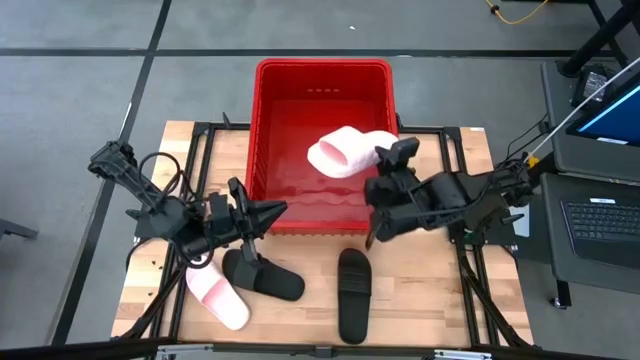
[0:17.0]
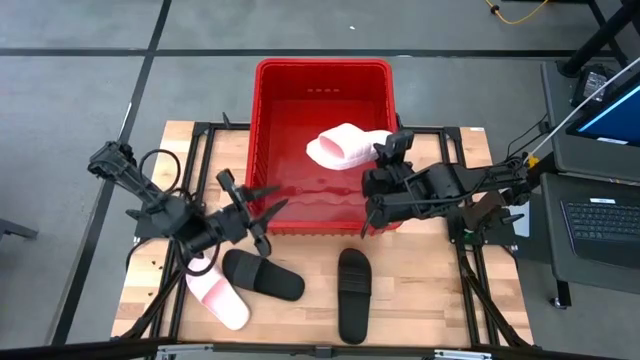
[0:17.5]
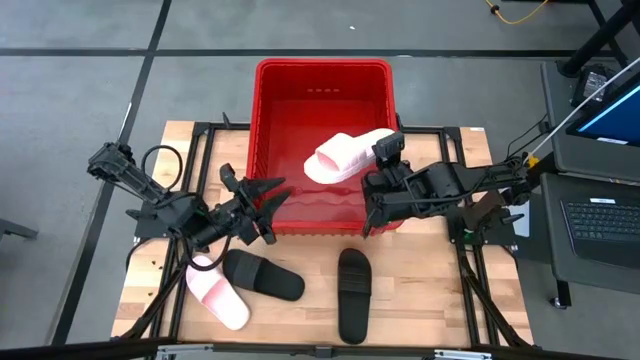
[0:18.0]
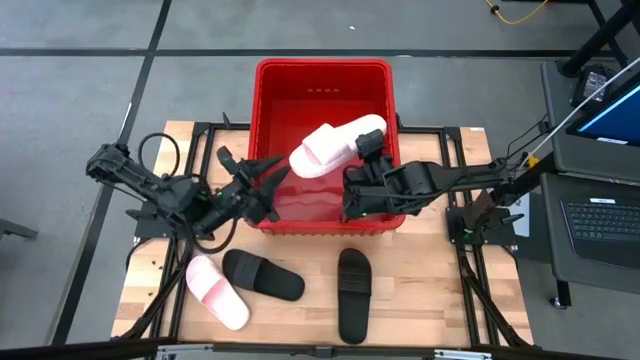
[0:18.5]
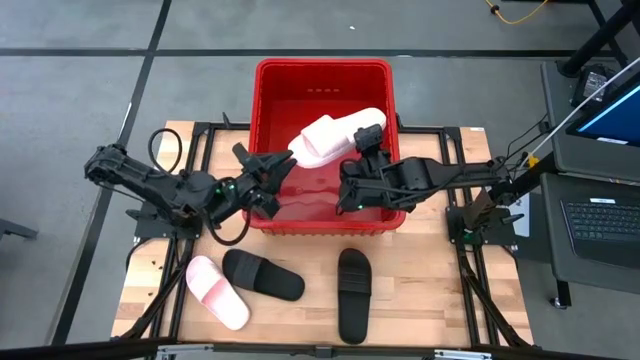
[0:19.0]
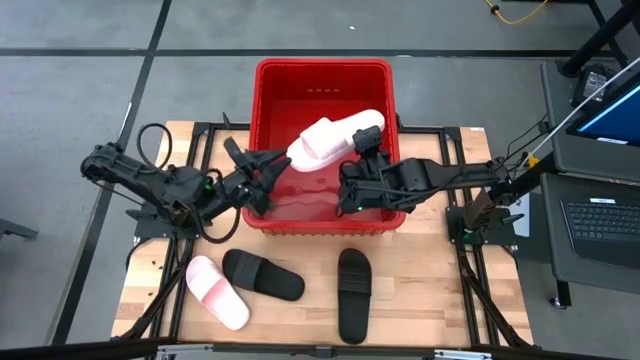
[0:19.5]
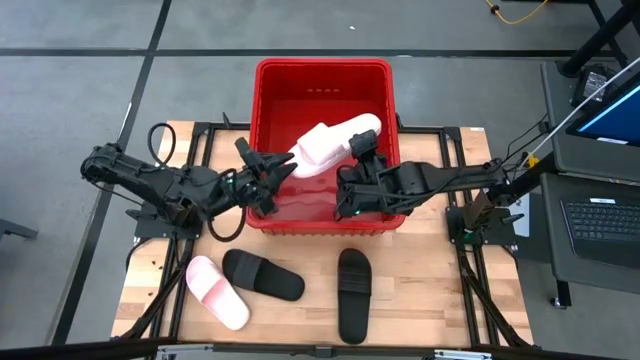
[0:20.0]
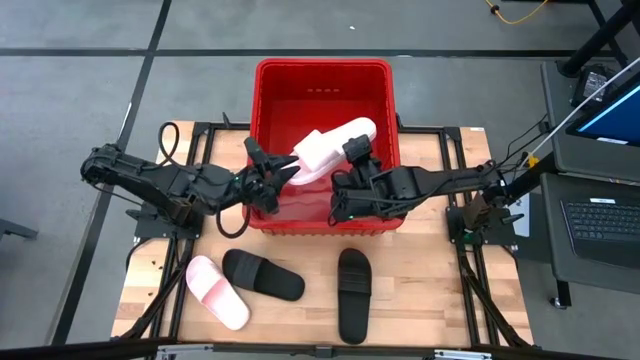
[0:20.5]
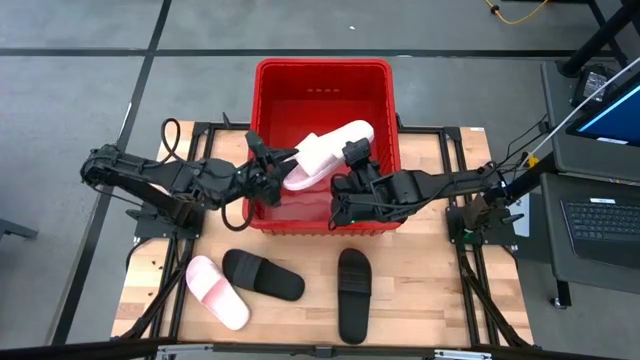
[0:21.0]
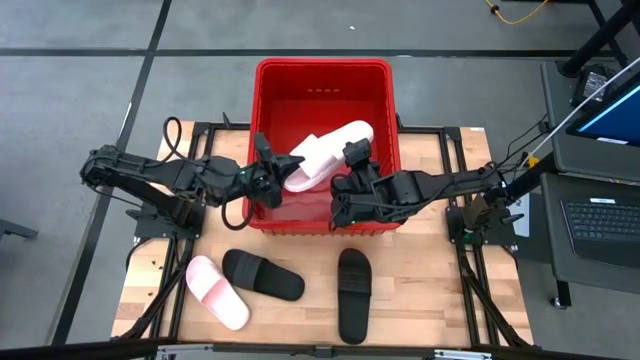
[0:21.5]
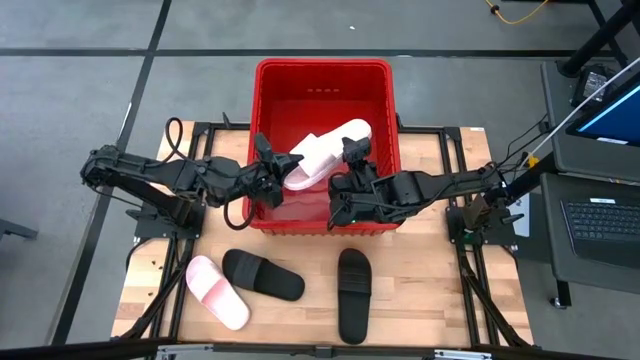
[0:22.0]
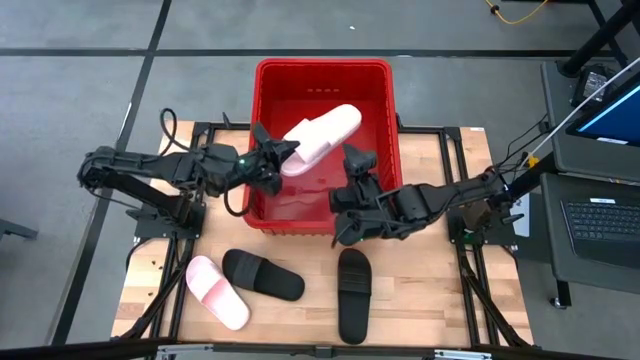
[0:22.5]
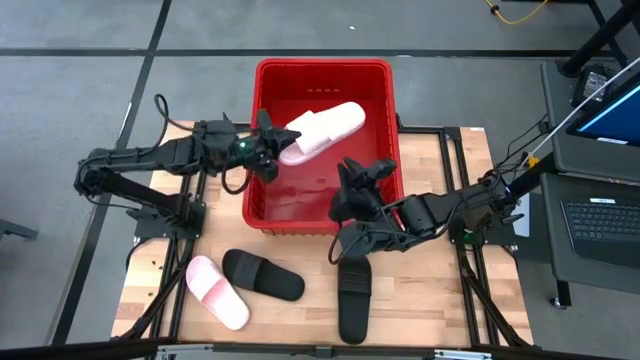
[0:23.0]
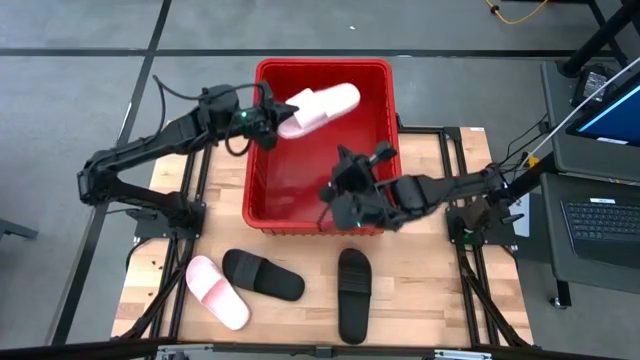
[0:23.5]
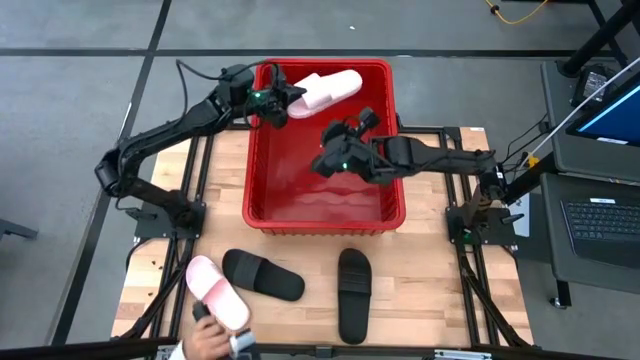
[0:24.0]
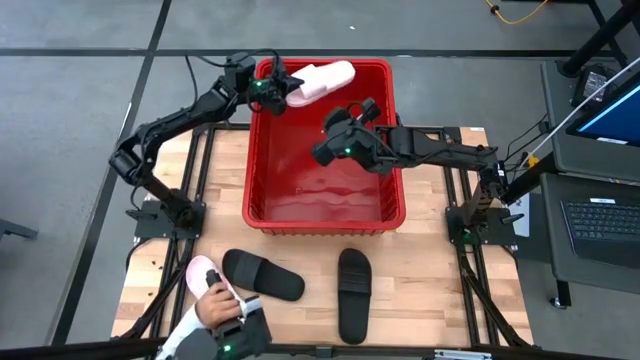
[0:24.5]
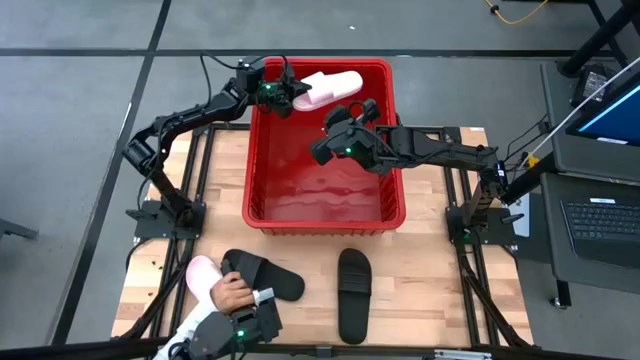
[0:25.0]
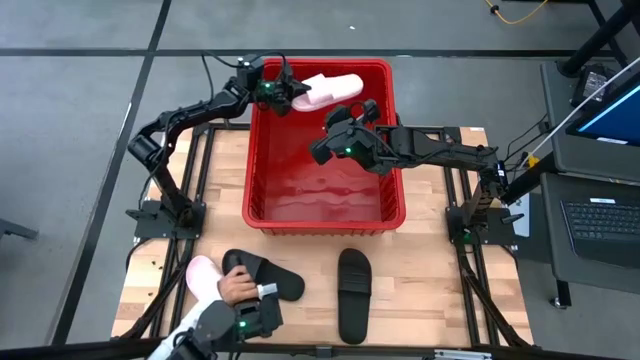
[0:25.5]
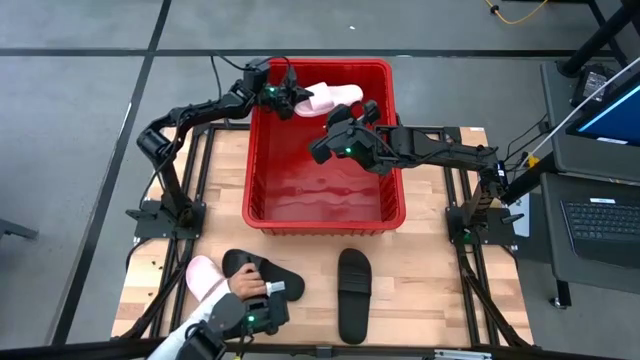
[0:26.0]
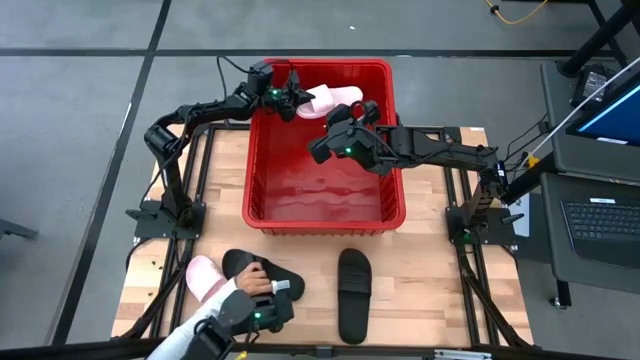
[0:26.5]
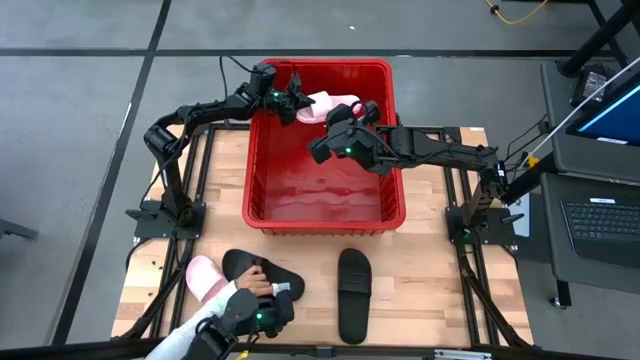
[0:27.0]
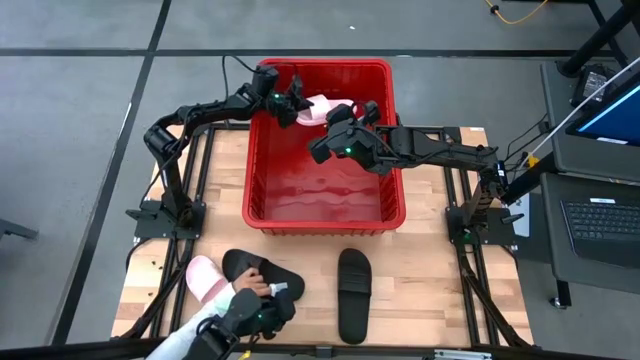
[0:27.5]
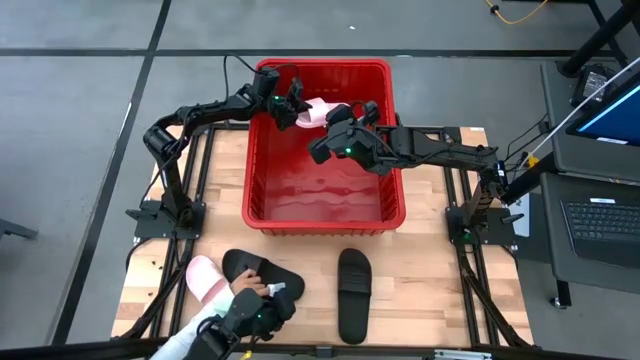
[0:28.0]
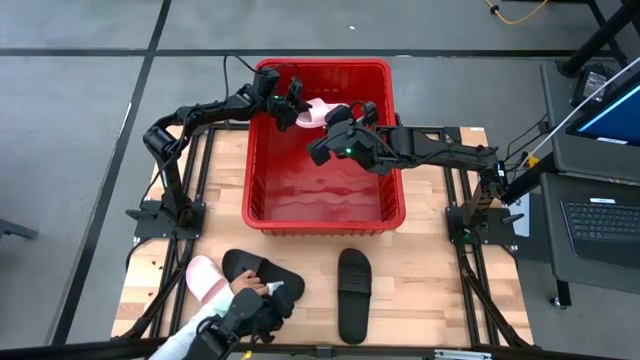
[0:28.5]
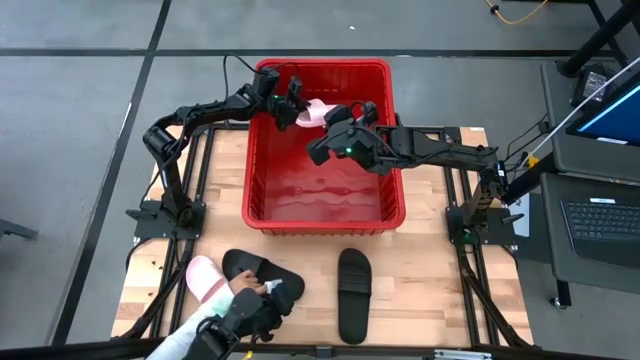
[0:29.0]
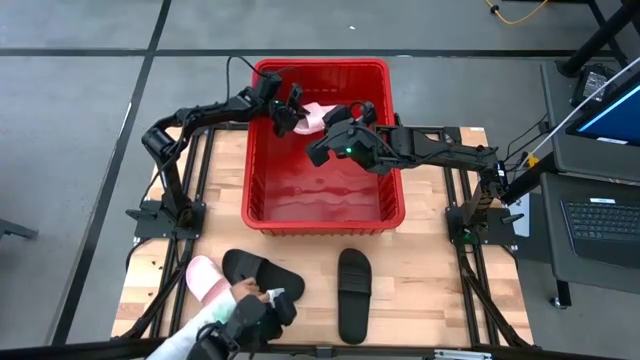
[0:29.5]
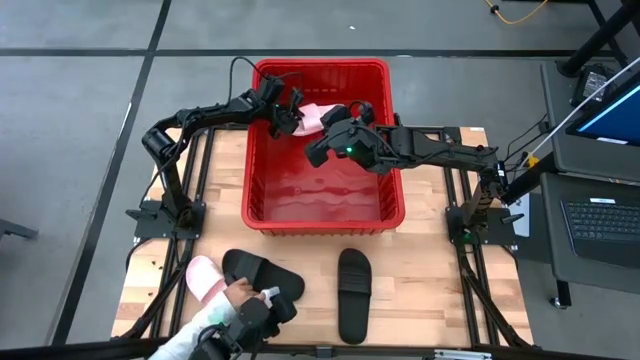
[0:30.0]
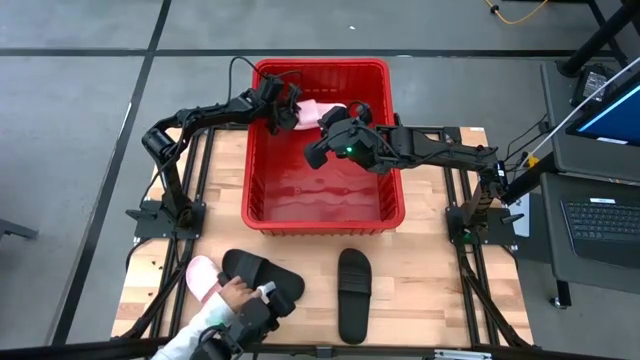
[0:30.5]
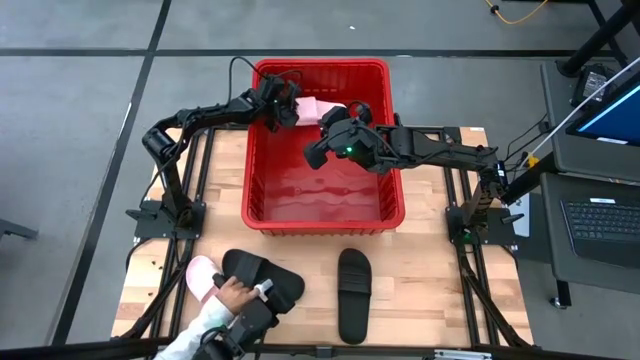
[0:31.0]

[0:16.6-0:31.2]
Task: Pick and place slides into bin
Put the right pink slide into the bin

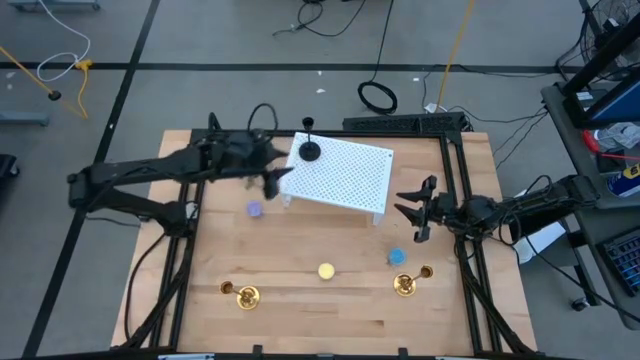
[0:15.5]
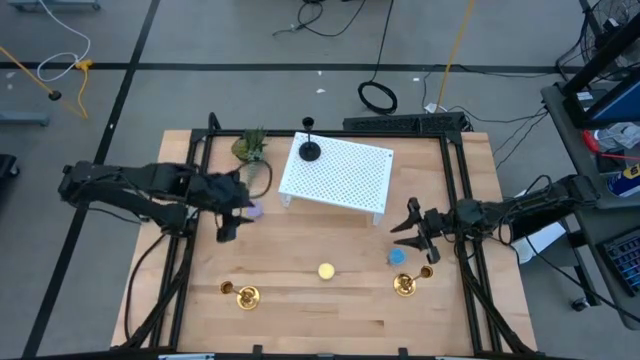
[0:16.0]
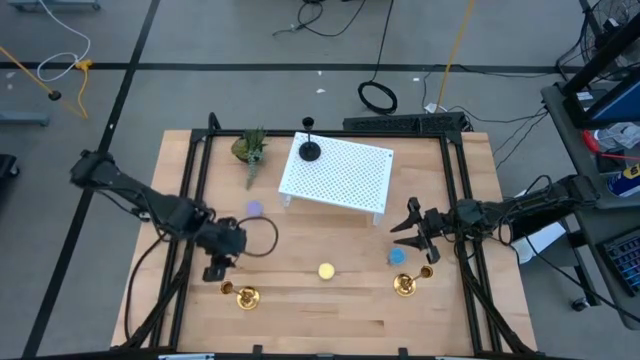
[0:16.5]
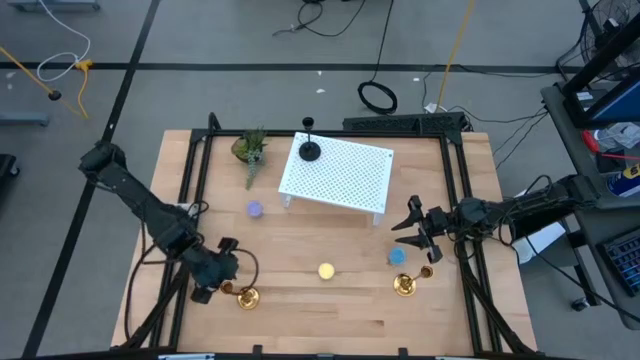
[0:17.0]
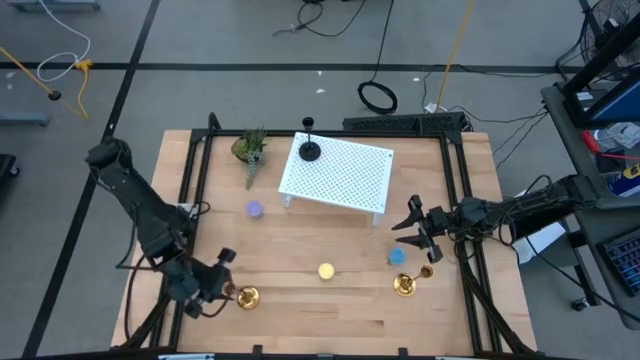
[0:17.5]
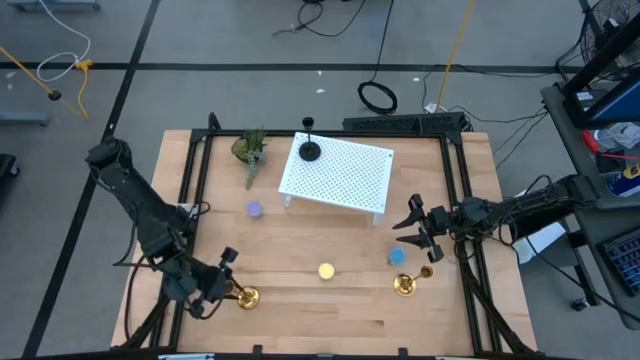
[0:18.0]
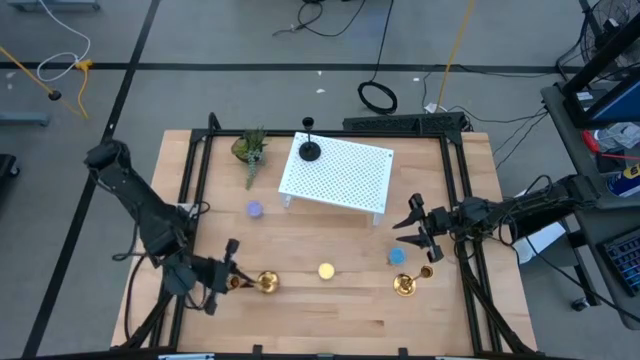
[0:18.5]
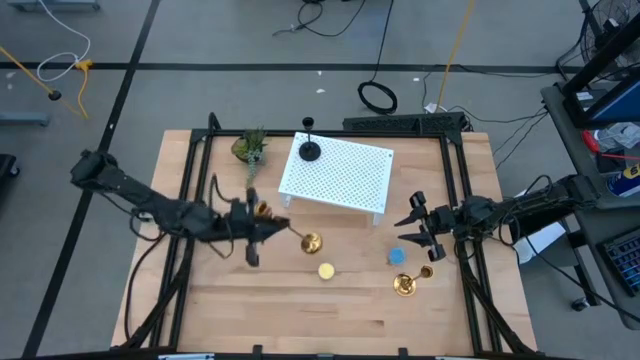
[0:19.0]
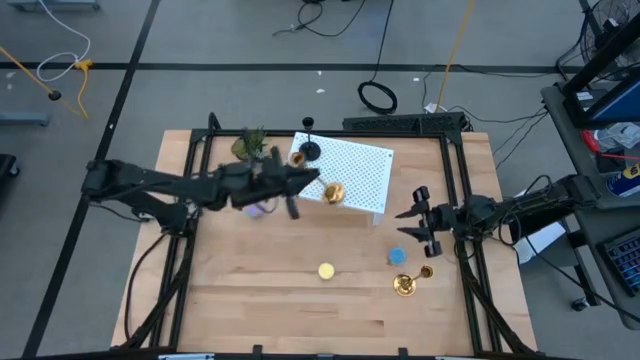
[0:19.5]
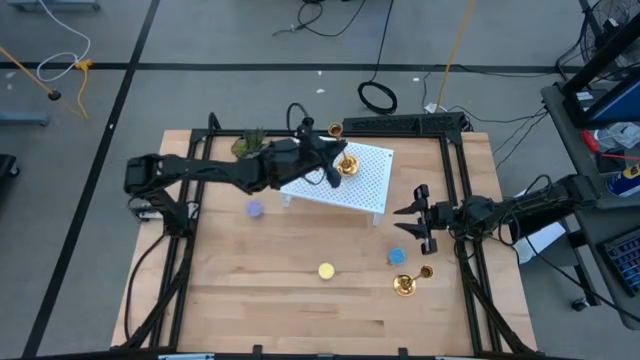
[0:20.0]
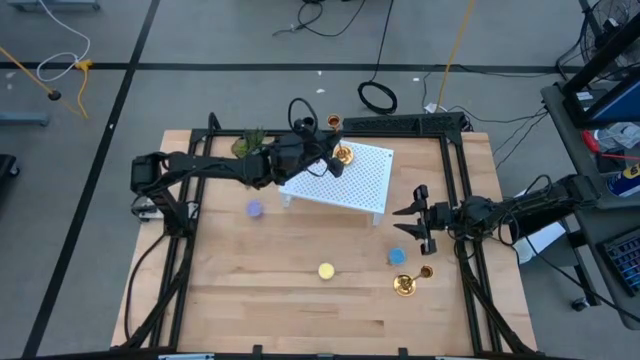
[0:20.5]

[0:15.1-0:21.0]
Task: Pick & Place candle stick holders
Put the golden candle holder on the shelf
